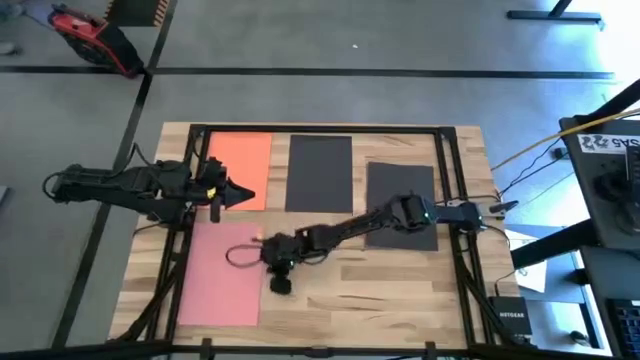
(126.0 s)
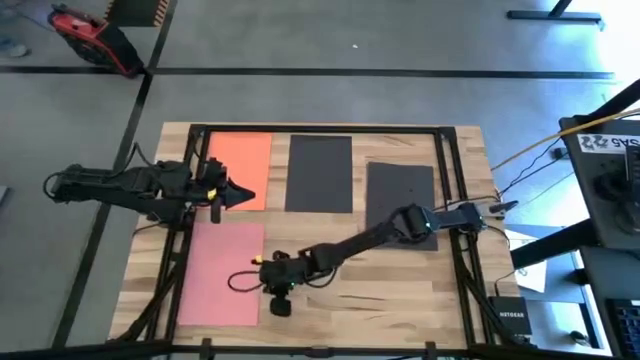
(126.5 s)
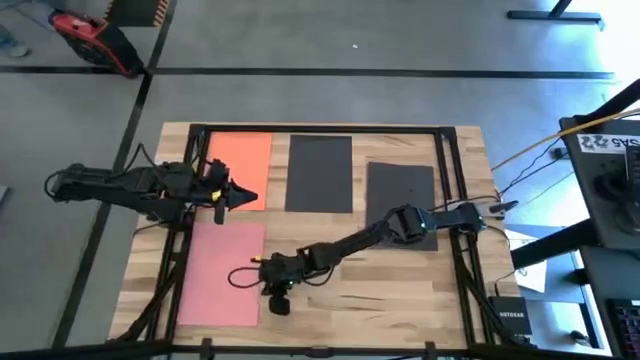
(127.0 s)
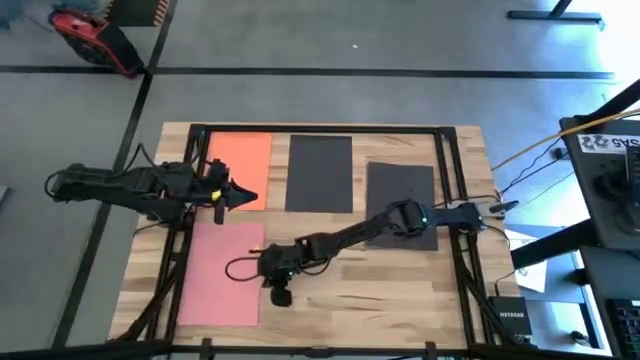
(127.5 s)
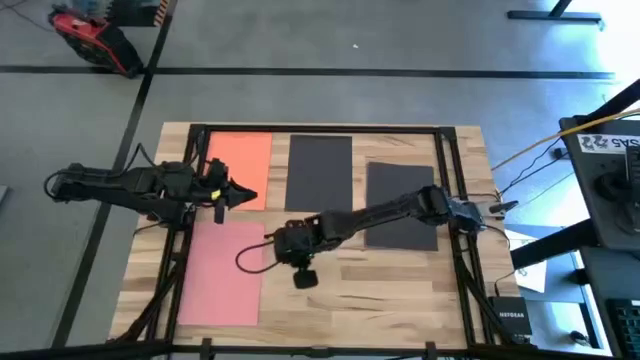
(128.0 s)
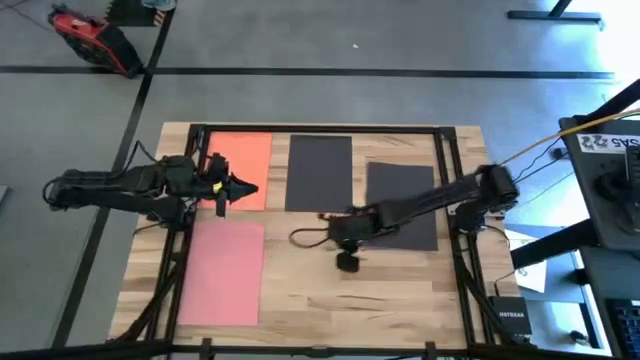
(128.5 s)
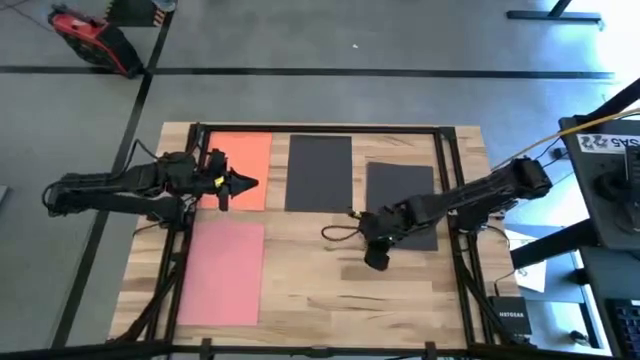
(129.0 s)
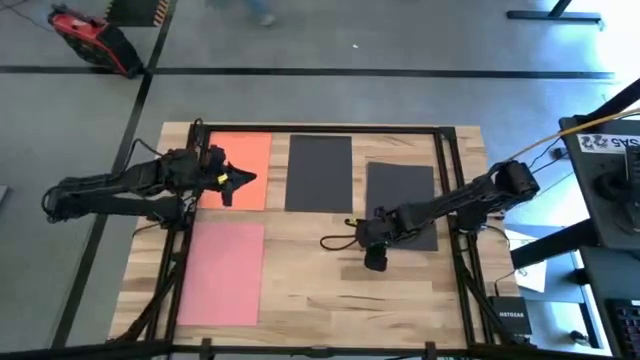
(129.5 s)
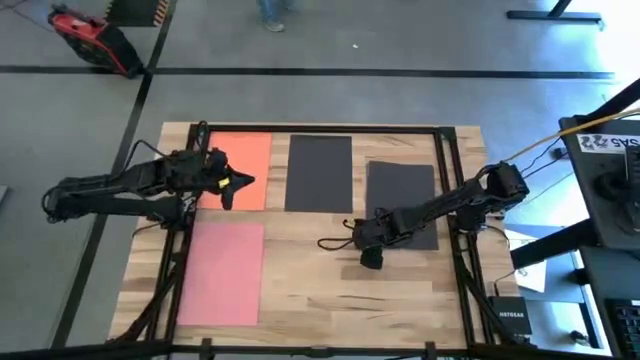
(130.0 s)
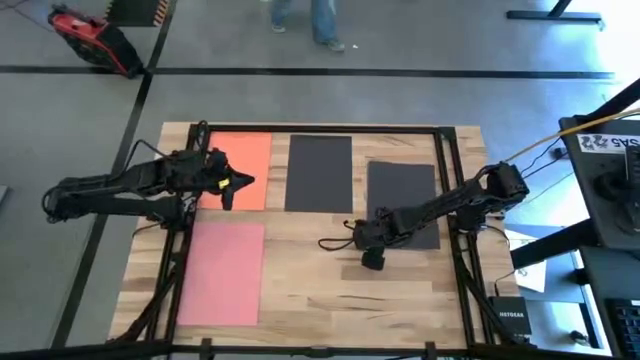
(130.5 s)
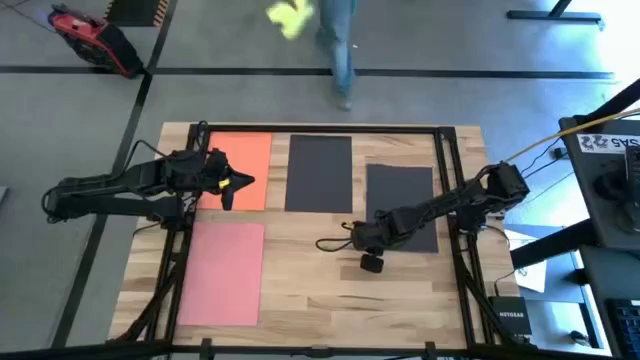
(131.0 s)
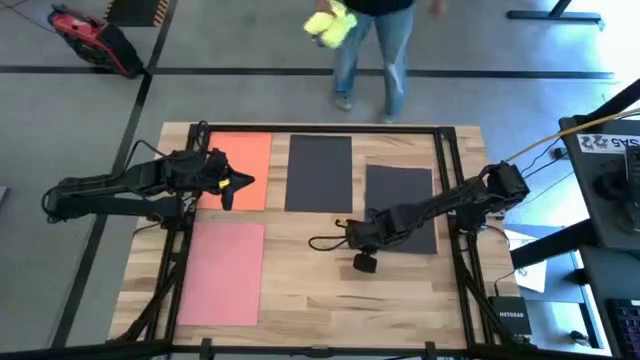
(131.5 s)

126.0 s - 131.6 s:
Task: Organize paper
Stack the black color paper on top of the other black color paper

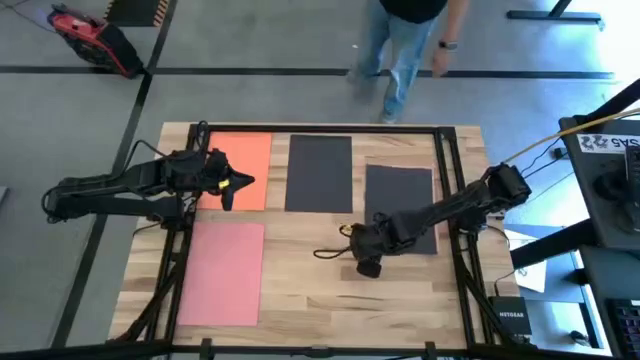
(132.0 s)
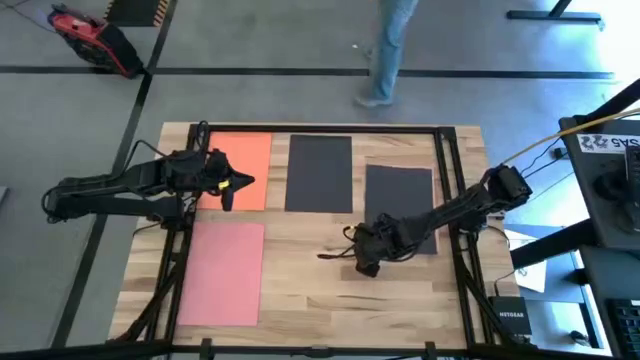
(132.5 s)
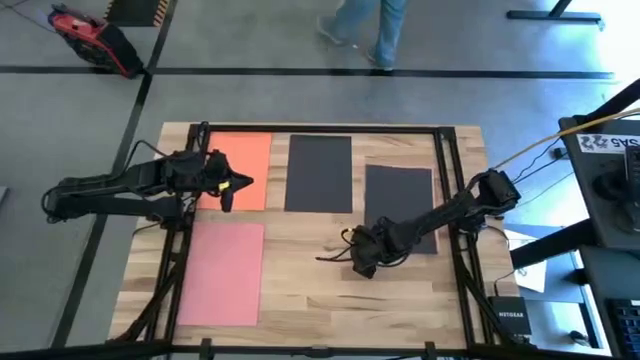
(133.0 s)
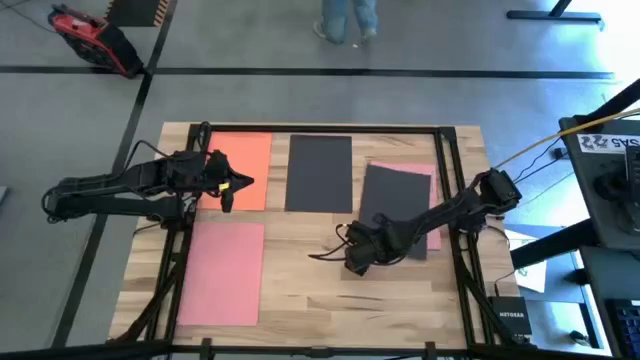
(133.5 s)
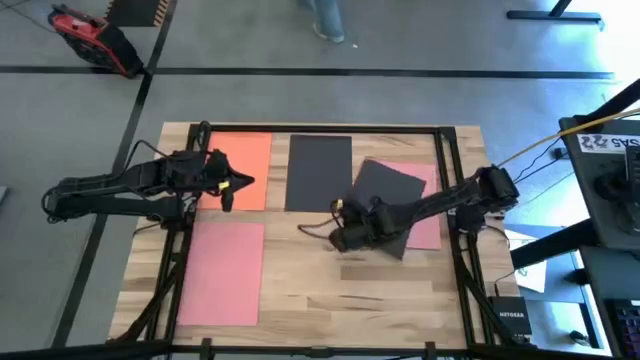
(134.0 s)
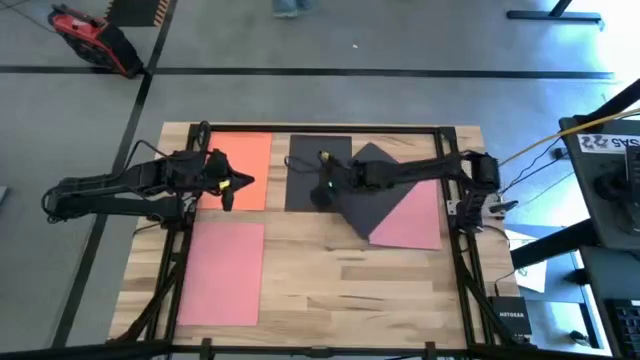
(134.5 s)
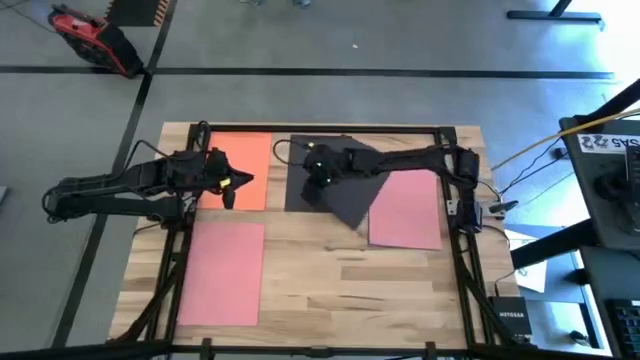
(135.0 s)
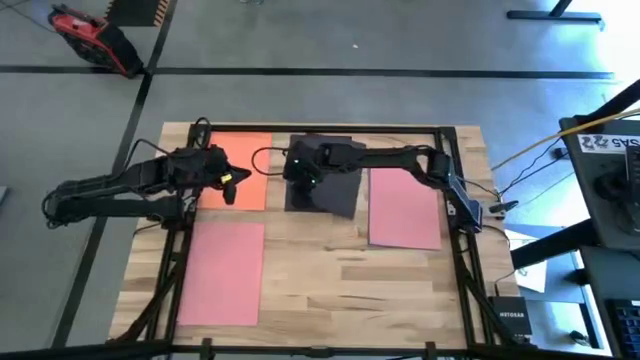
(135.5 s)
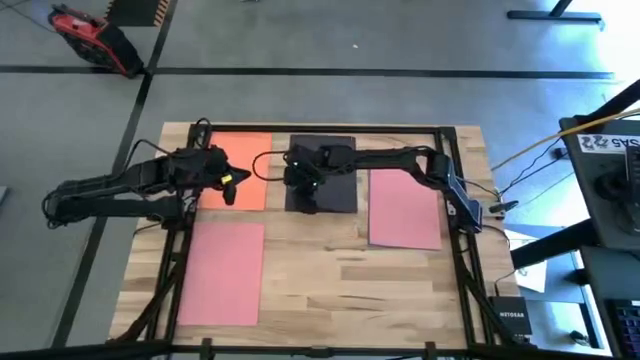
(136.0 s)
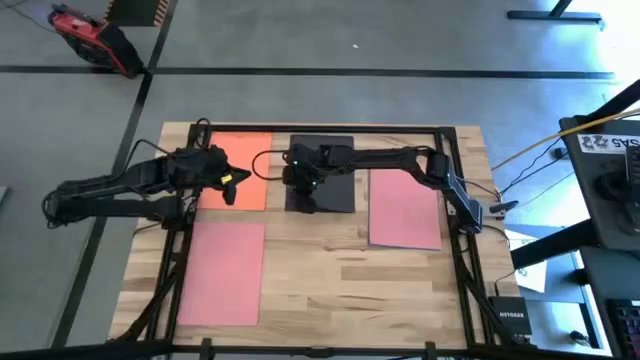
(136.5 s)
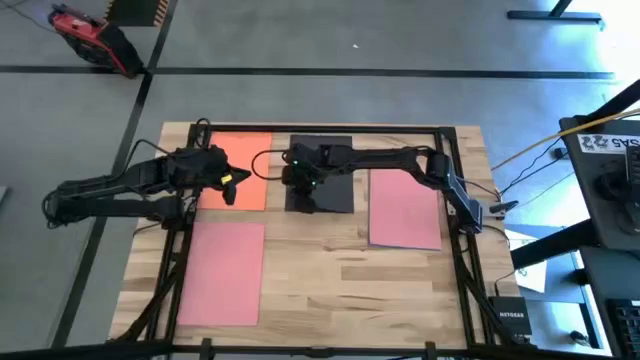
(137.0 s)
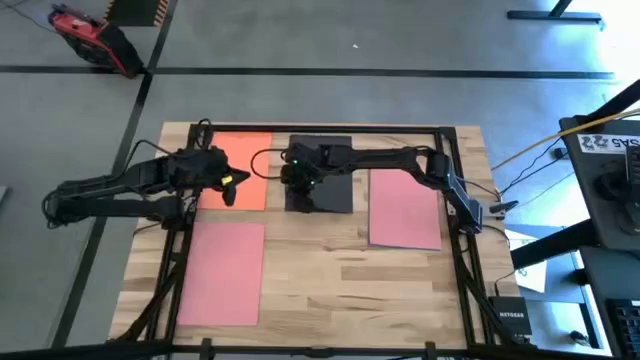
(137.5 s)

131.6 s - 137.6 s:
Stack the black color paper on top of the other black color paper

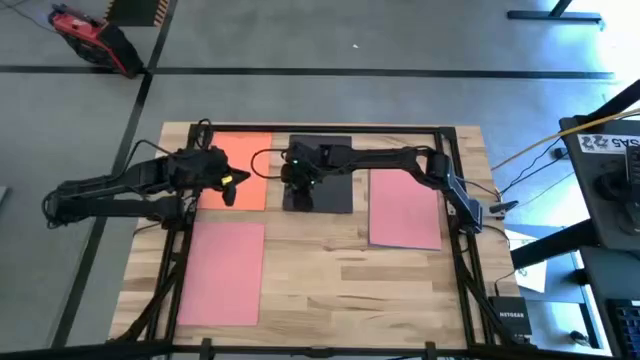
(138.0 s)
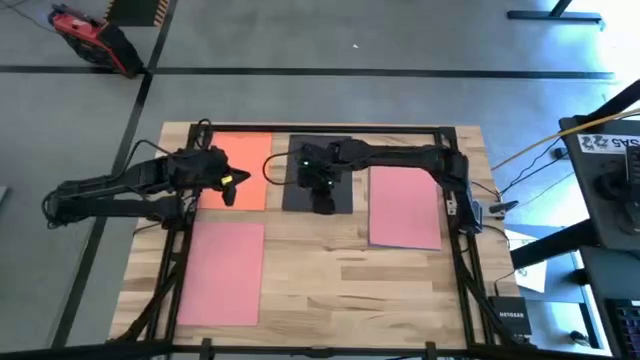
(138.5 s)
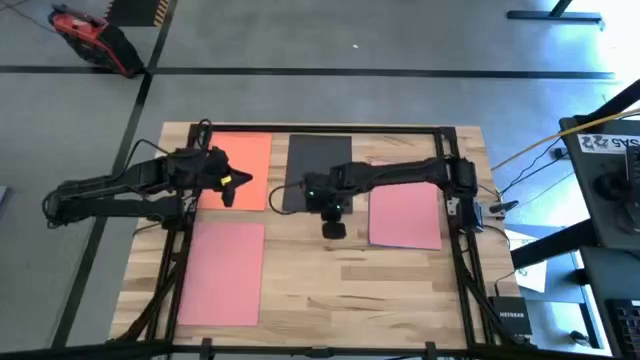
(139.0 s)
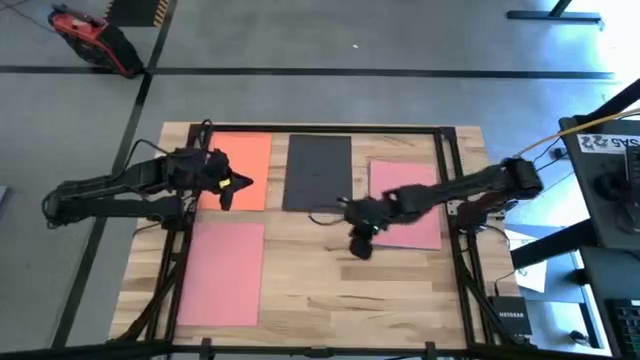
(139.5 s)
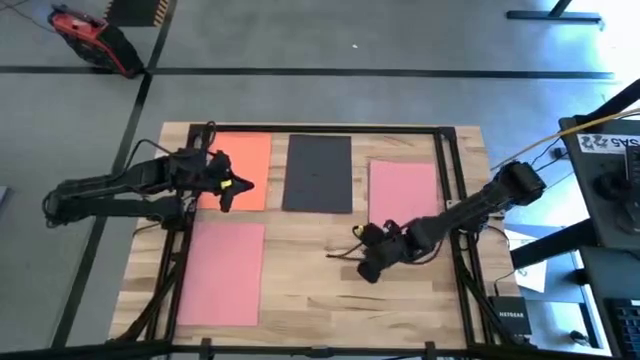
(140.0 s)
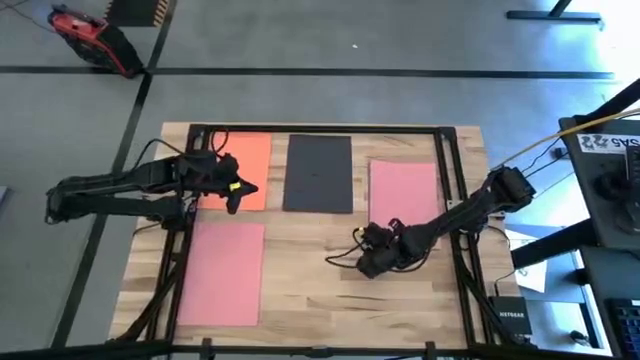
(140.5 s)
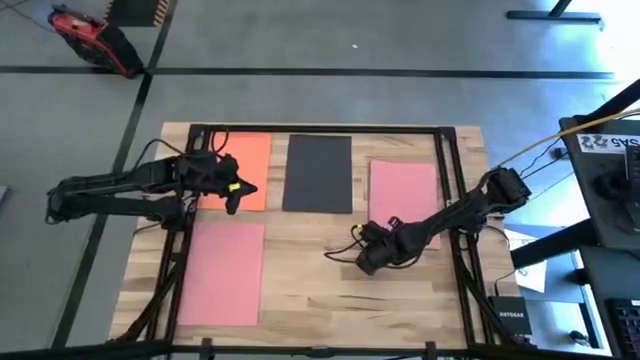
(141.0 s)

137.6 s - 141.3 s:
Stack the pink color paper on top of the other pink color paper

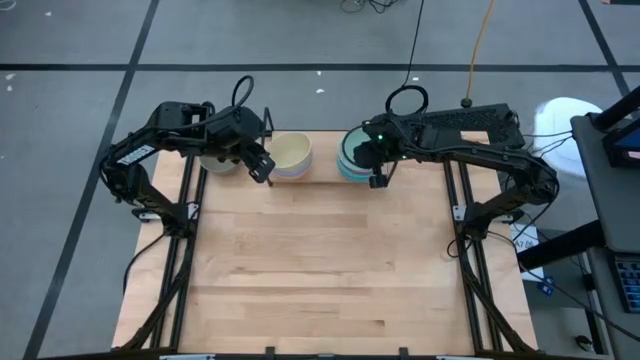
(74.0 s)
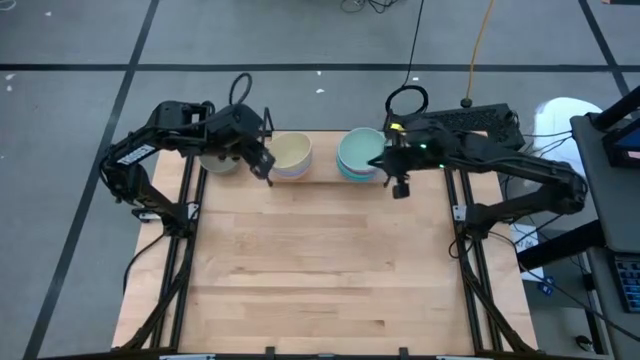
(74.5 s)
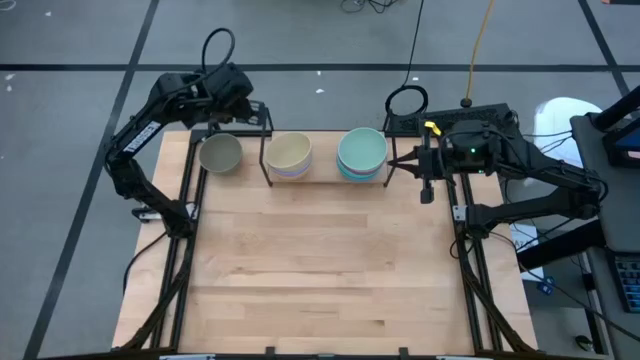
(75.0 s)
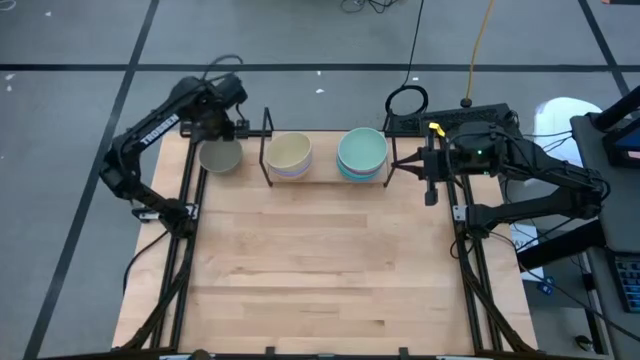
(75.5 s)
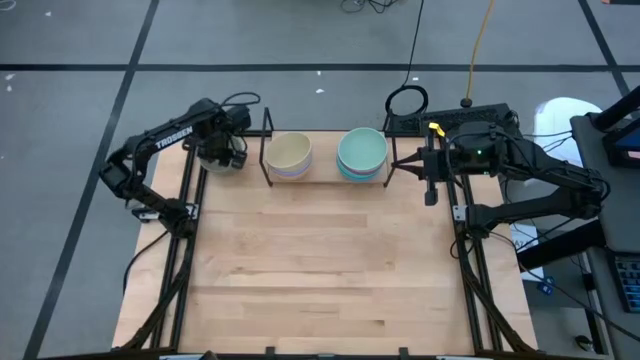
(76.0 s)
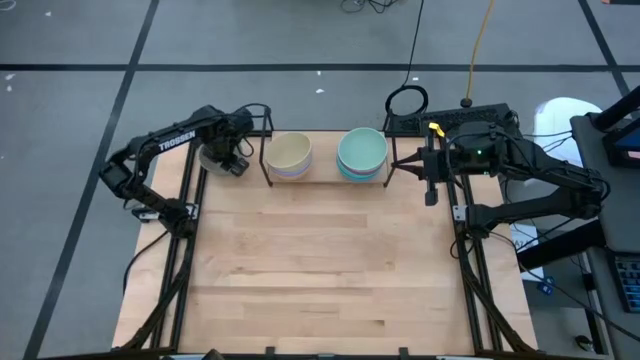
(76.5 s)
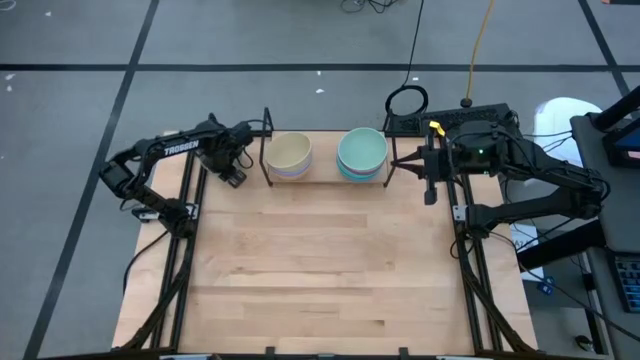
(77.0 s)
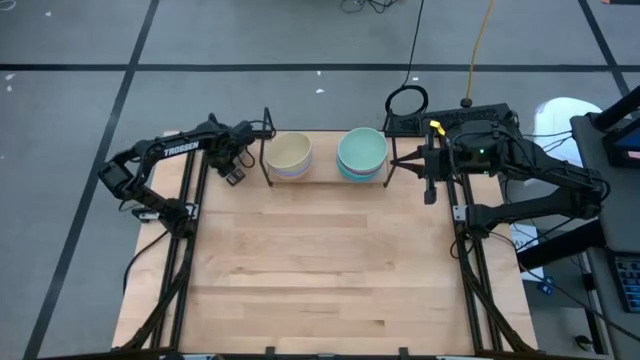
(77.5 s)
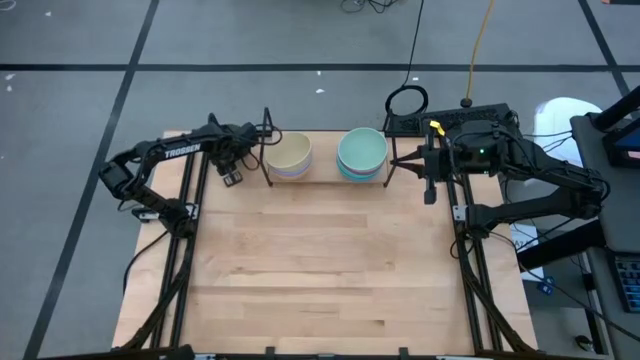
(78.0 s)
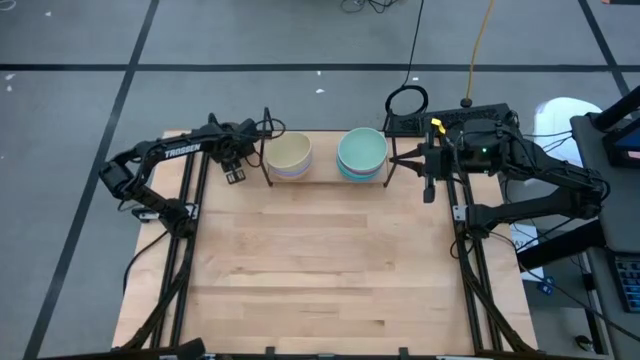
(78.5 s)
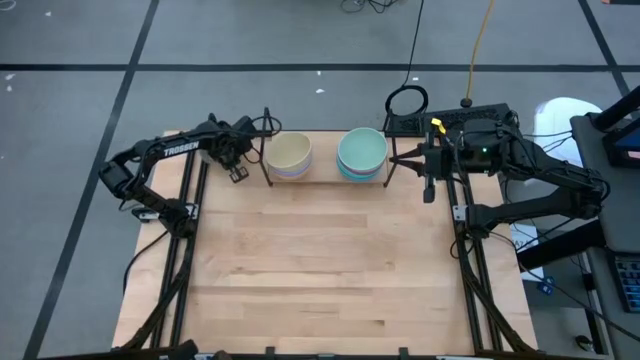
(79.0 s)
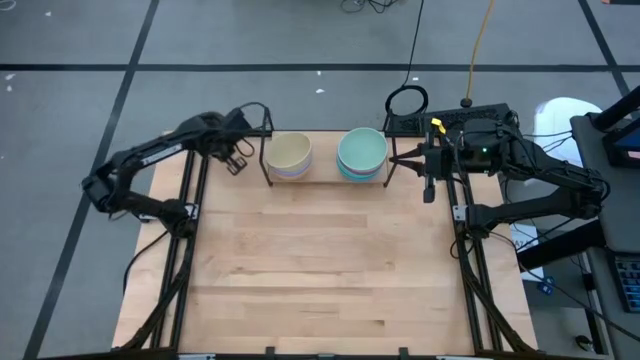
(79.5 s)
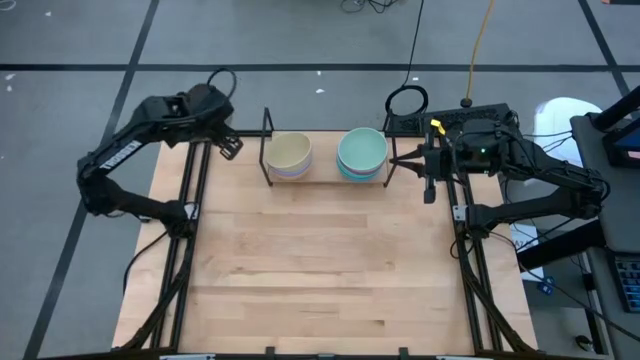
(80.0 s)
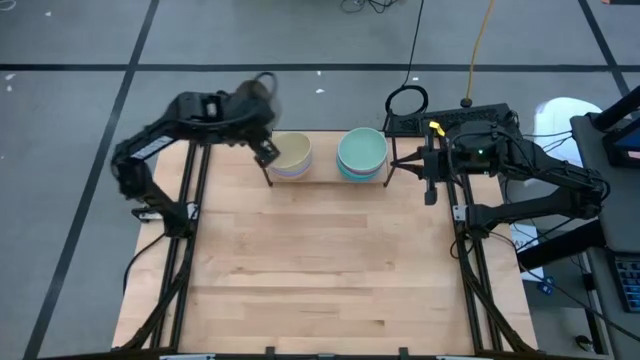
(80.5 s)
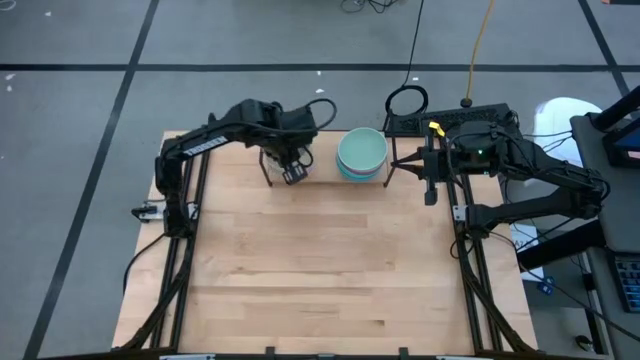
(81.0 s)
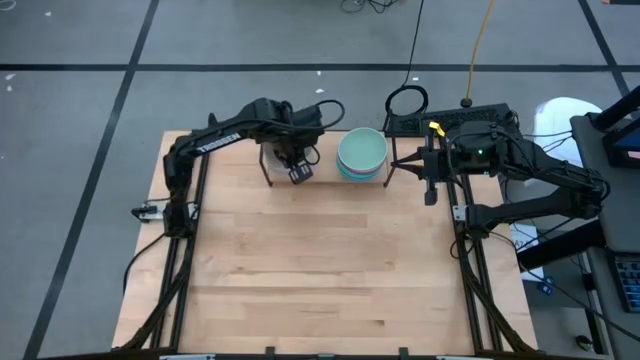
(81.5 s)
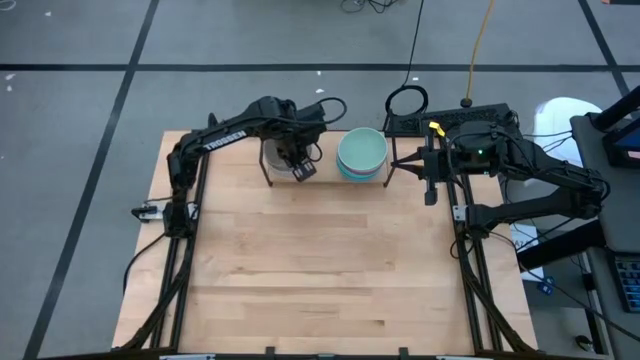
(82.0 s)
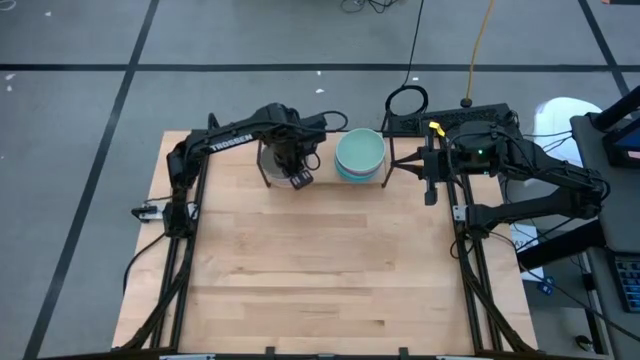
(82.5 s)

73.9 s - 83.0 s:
Task: Place and stack bowls onto a shelf
Stack the gray bowl on top of the yellow bowl on the shelf
